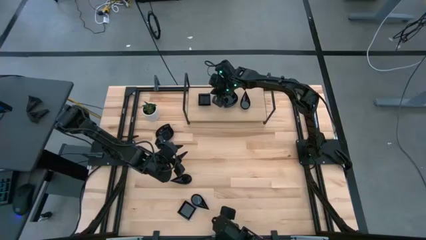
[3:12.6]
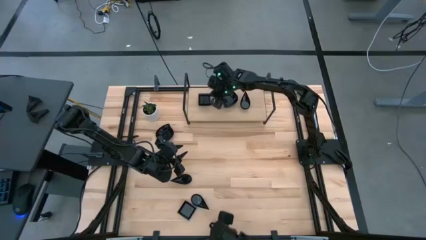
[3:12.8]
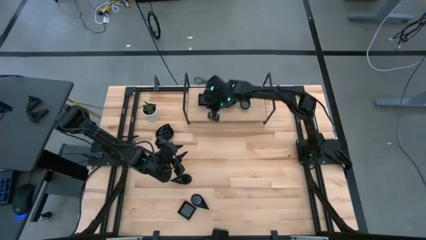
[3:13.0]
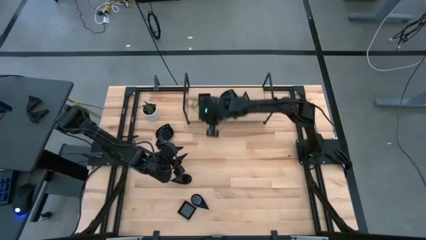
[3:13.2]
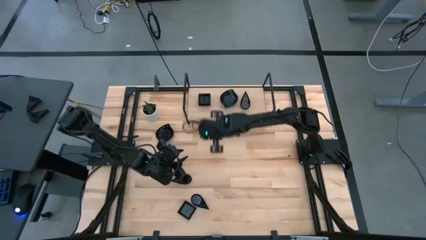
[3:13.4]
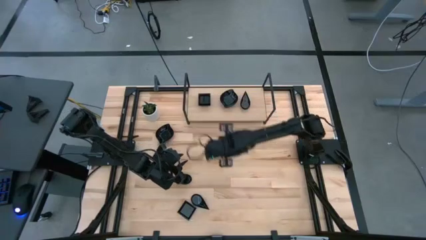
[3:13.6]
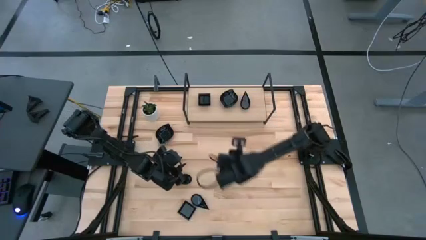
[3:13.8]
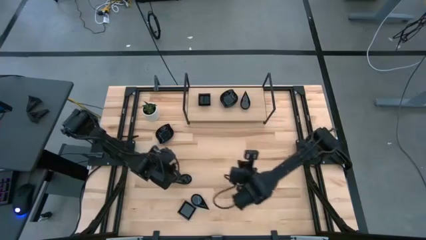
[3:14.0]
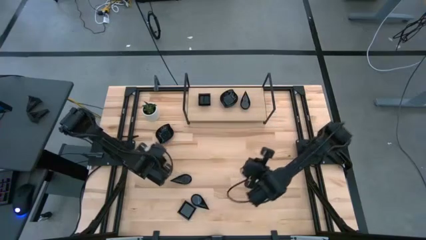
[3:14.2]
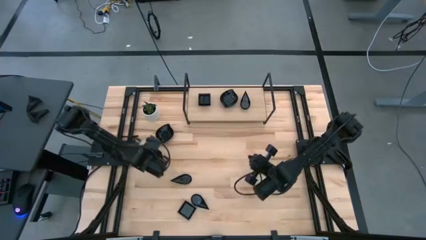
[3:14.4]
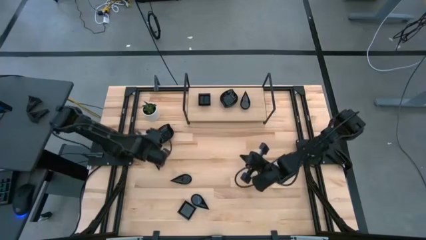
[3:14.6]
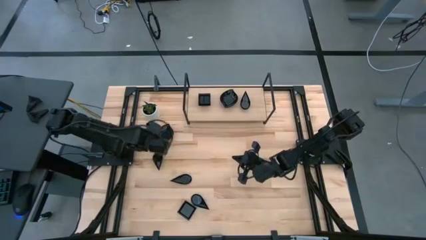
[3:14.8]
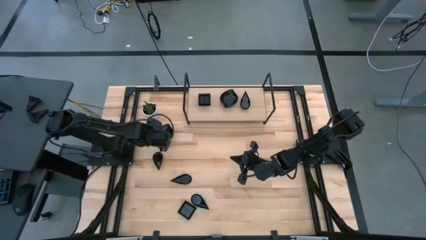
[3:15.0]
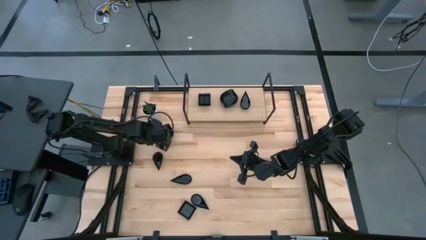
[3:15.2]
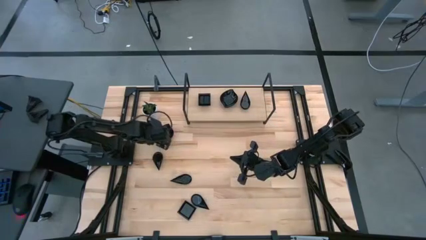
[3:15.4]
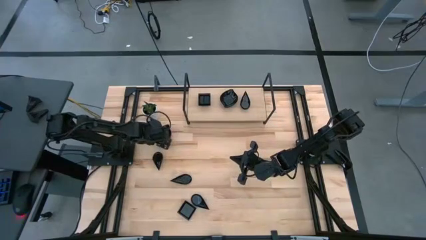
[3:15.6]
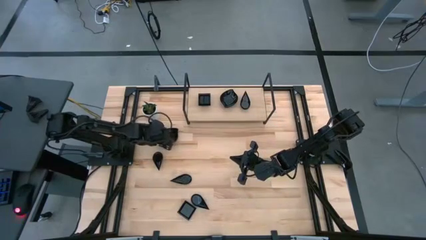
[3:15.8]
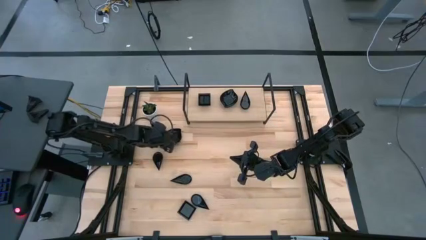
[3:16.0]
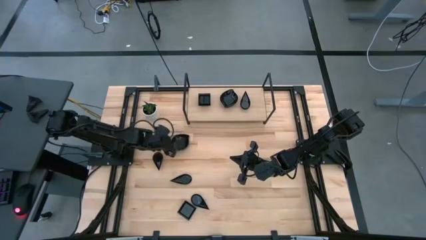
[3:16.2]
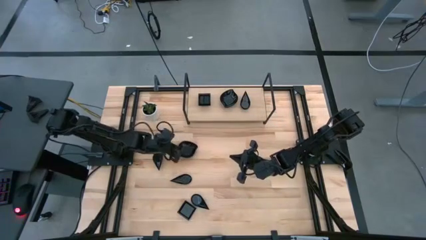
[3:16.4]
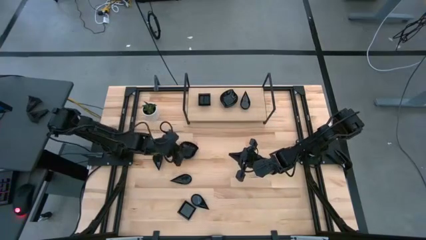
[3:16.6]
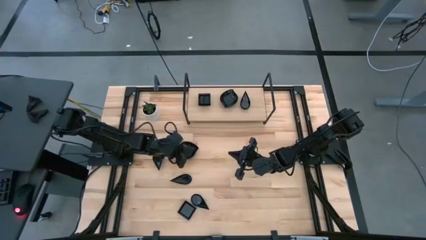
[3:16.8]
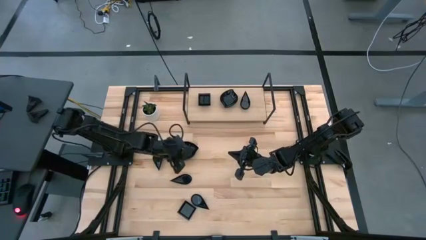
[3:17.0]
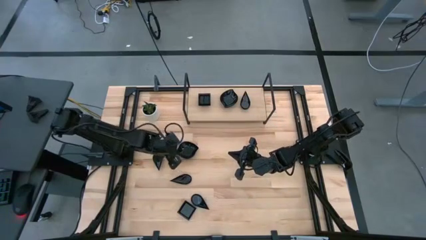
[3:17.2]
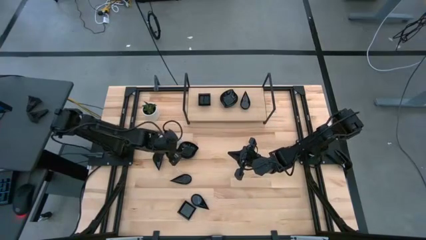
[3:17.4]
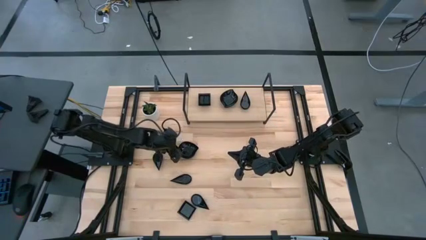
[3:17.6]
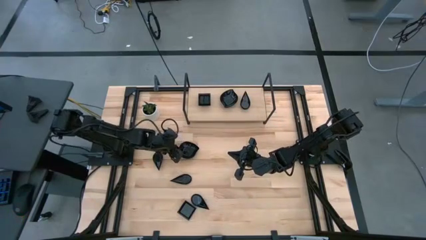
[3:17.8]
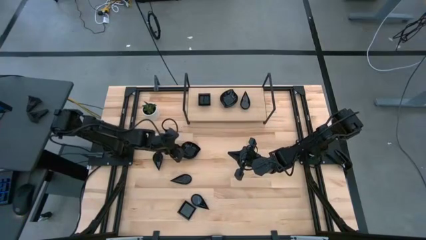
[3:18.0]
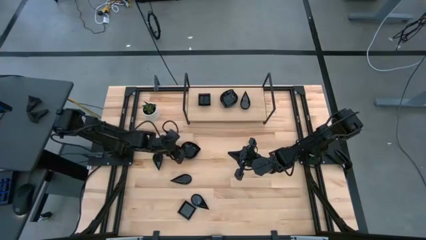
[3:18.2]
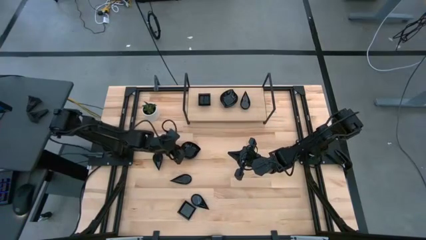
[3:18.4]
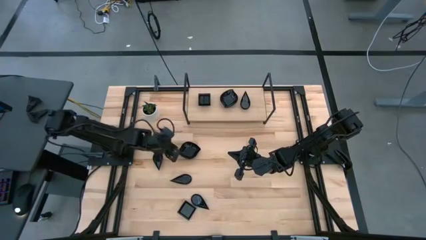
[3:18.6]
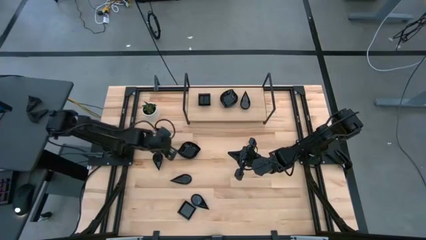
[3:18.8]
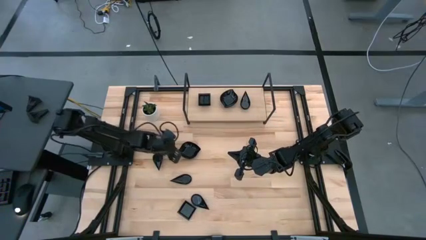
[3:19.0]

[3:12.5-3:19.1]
Task: Pick & Place Mini shaped plates
Stack the black leaf shaped bowl on top of the other black leaf shaped bowl on the shelf

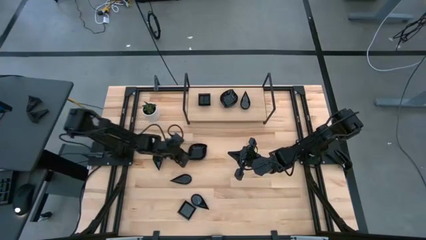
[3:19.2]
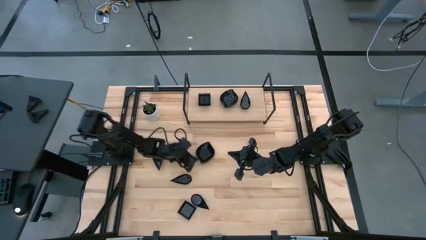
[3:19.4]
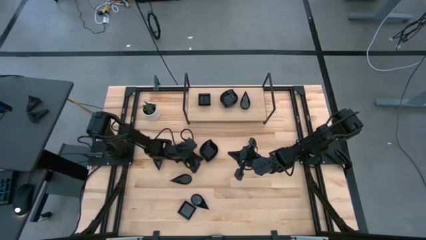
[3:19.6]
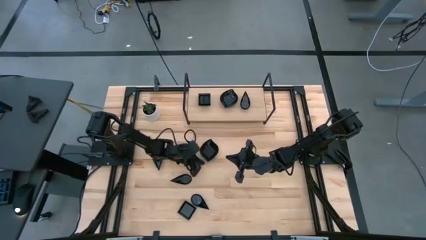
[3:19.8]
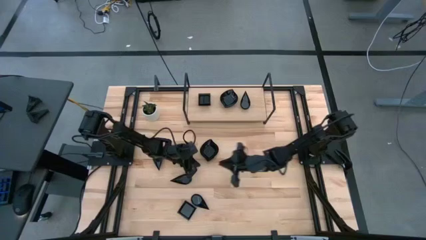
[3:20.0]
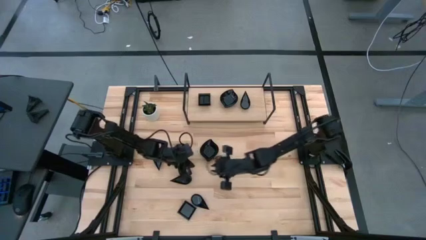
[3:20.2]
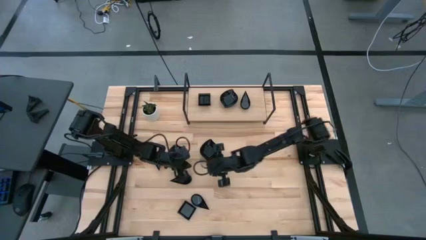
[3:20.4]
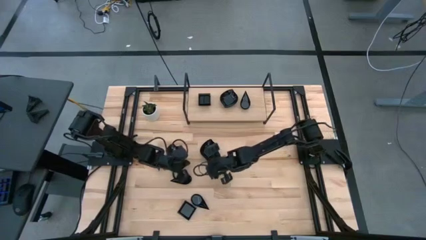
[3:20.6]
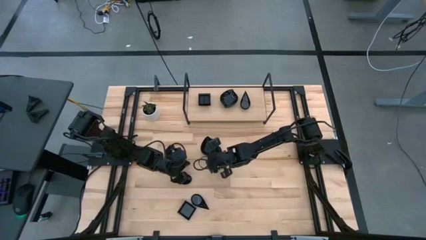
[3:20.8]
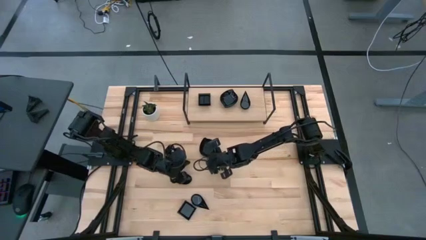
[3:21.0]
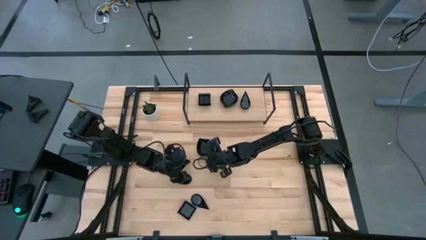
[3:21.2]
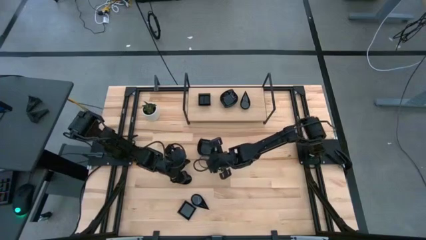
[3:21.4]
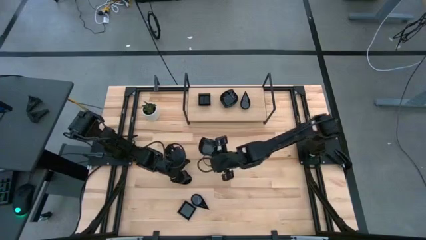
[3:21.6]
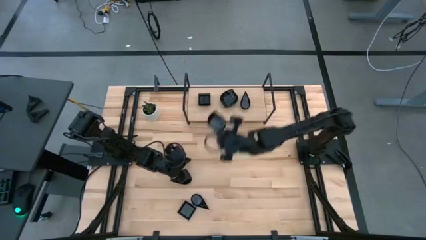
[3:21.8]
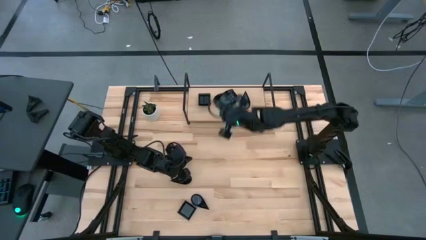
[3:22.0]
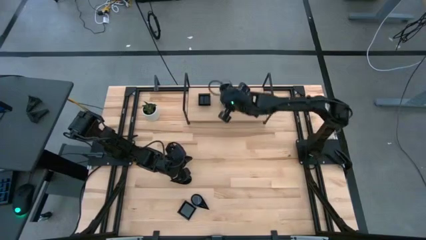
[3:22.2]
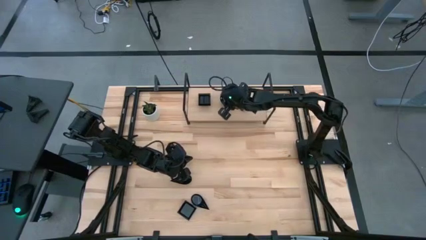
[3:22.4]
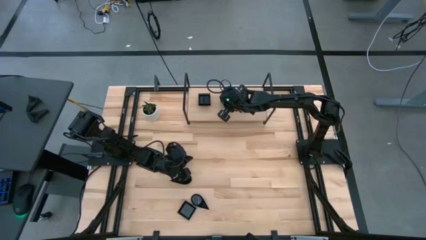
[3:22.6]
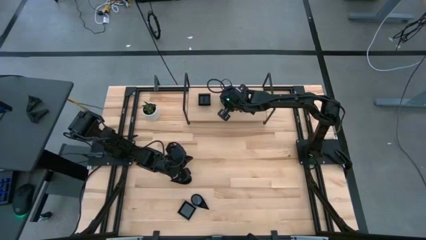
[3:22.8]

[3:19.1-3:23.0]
Stack the black leaf shaped bowl on top of the other black leaf shaped bowl on the shelf

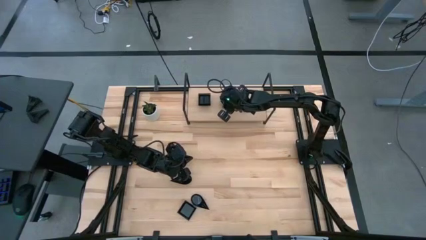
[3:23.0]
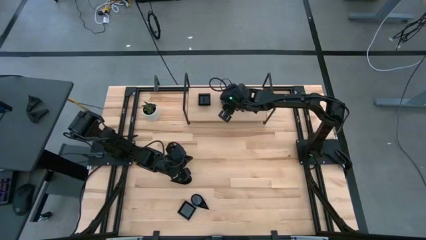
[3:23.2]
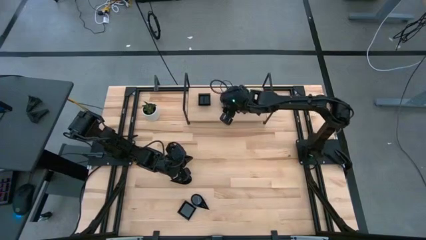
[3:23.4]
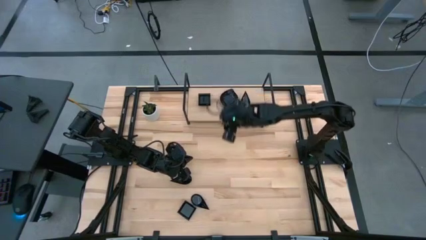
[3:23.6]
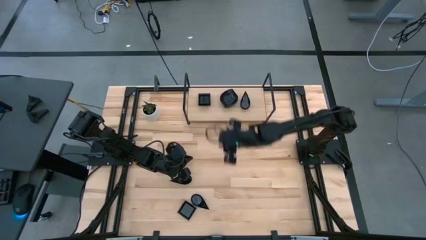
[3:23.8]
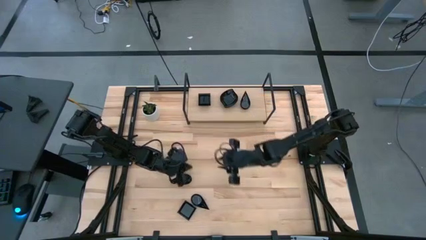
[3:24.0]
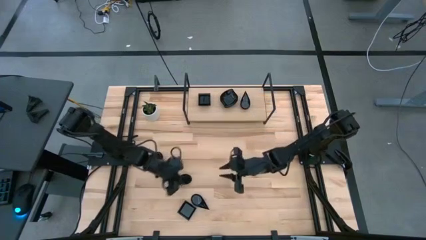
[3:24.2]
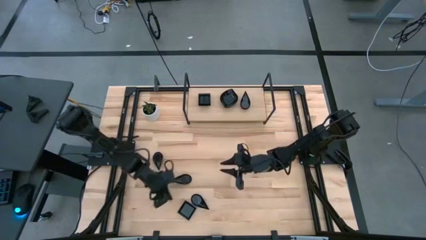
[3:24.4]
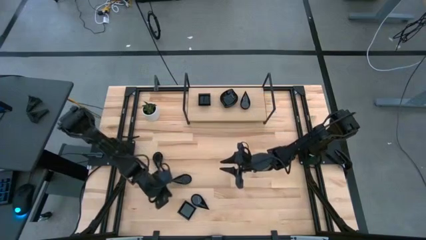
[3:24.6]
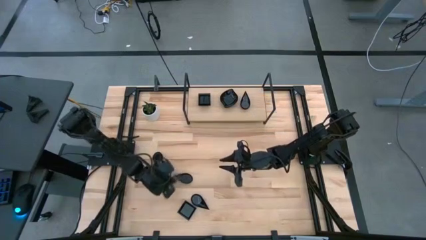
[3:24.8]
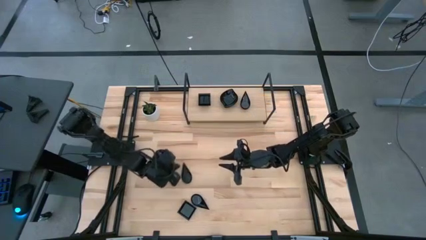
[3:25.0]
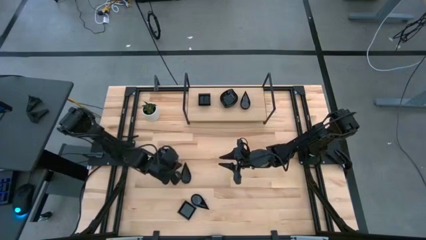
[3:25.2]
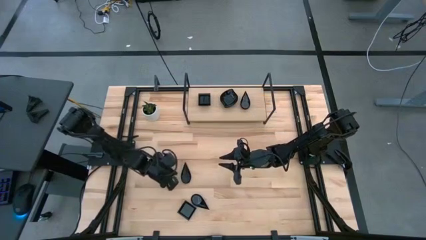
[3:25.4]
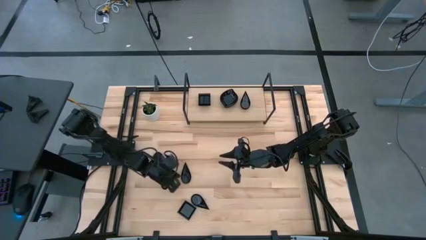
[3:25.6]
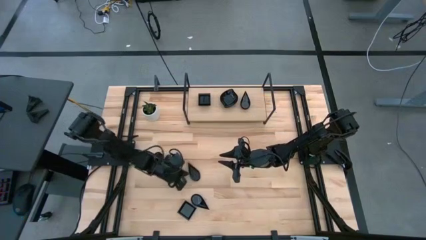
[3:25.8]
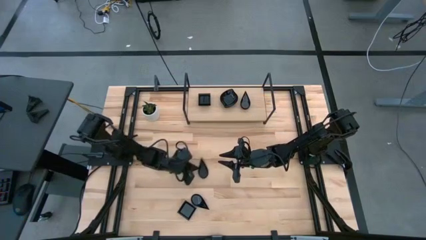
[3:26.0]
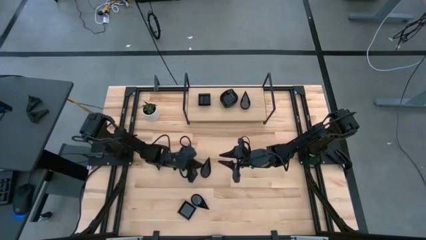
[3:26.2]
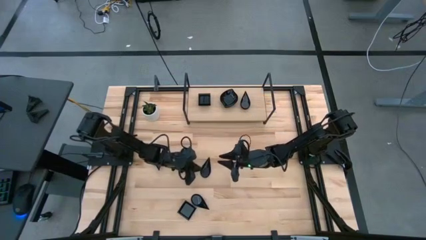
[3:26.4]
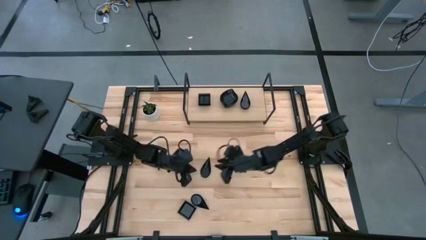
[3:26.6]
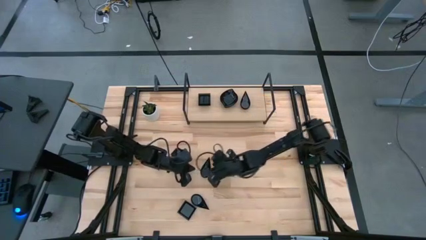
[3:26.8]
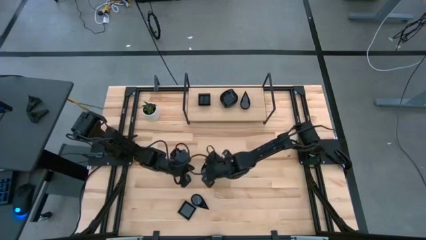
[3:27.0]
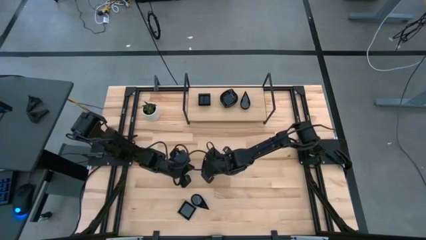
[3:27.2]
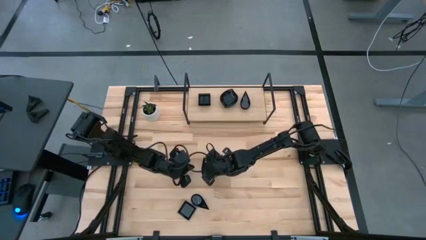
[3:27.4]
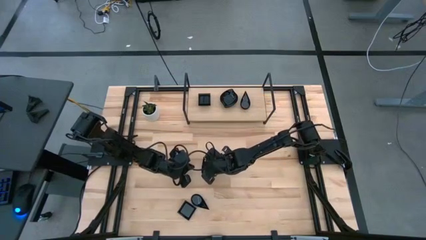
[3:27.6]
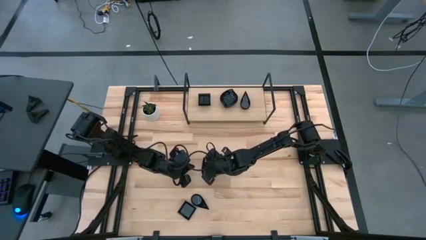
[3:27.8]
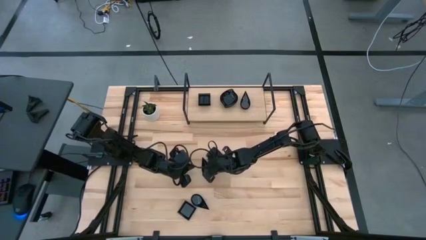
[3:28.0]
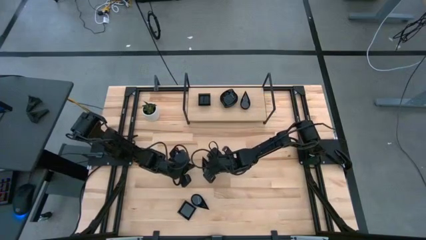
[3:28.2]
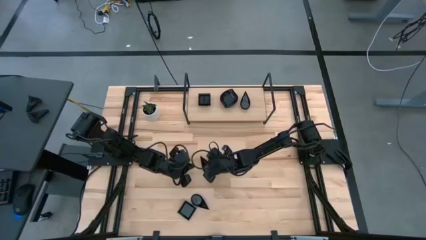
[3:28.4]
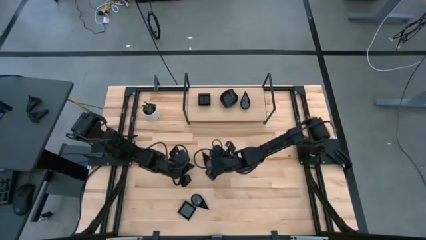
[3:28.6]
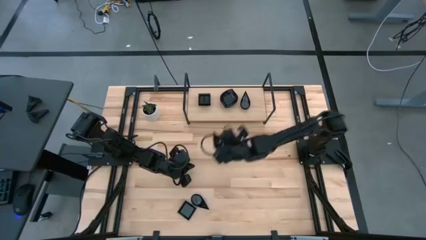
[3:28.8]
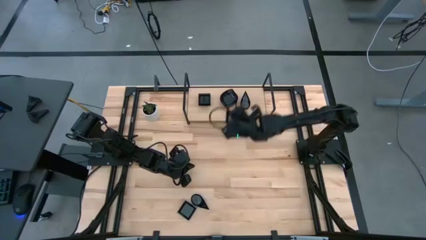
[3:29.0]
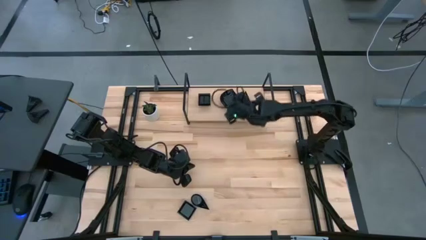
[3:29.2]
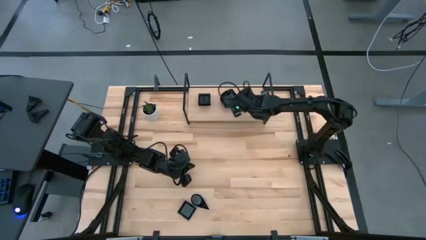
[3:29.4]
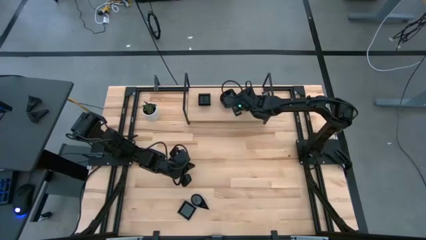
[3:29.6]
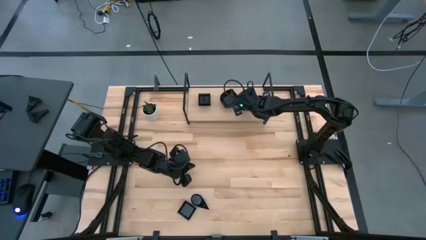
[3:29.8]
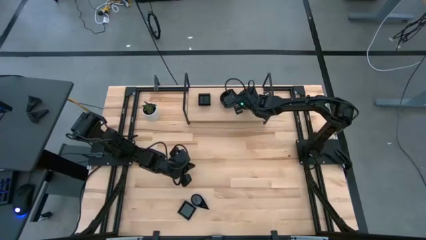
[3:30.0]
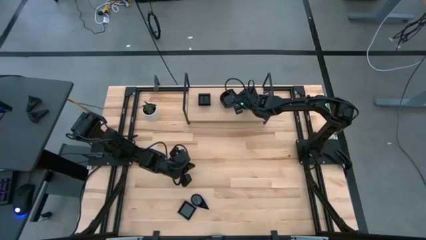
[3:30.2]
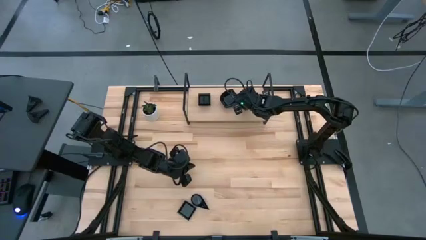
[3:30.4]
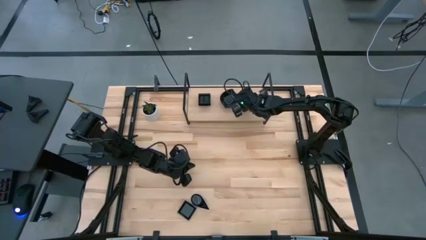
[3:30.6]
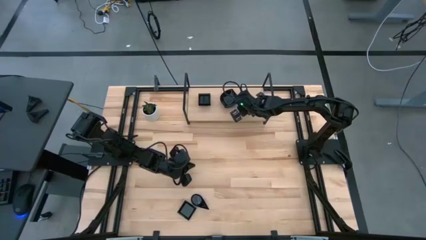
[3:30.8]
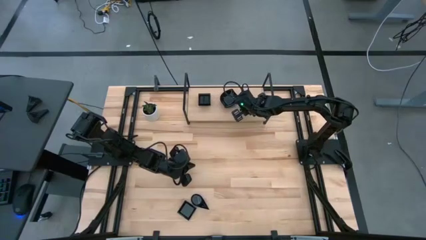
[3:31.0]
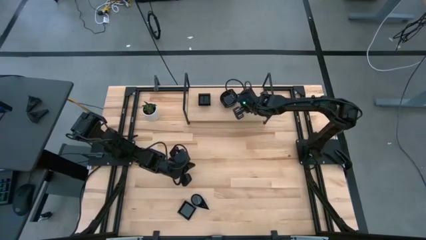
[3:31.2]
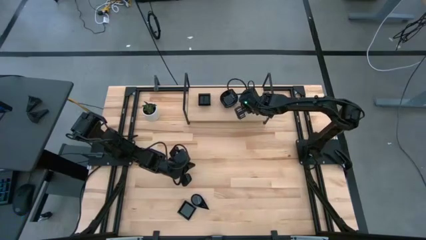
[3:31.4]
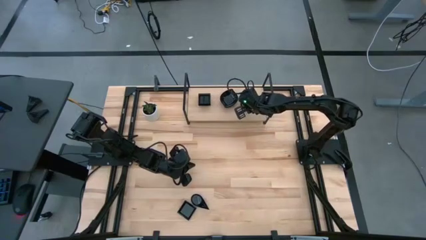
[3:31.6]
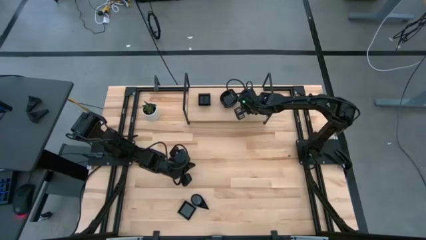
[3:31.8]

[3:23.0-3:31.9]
Stack the black teardrop shaped bowl on top of the other black teardrop shaped bowl on the shelf
